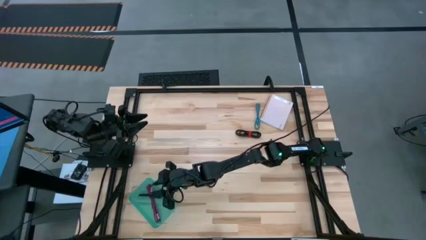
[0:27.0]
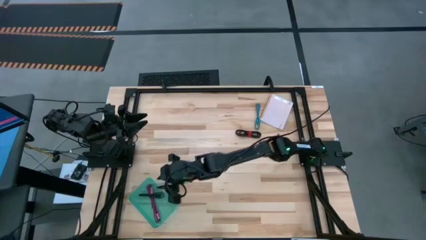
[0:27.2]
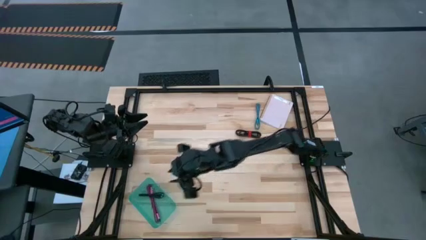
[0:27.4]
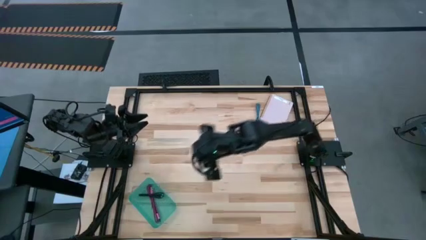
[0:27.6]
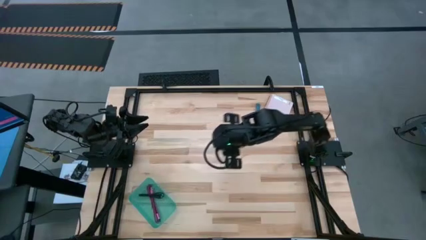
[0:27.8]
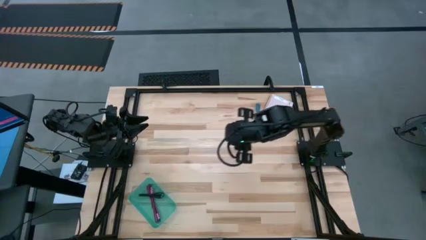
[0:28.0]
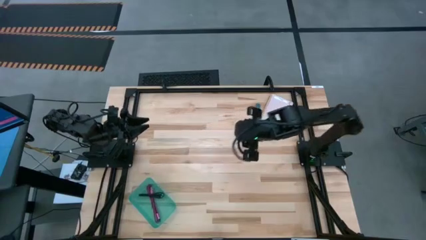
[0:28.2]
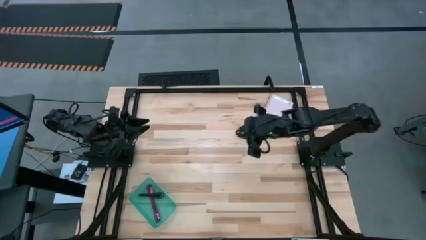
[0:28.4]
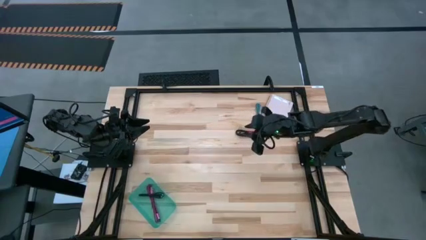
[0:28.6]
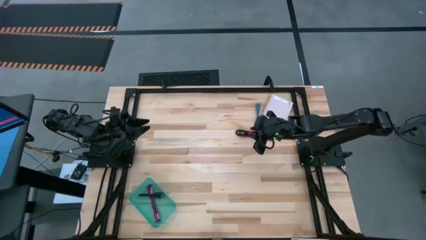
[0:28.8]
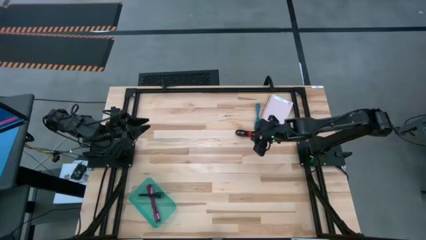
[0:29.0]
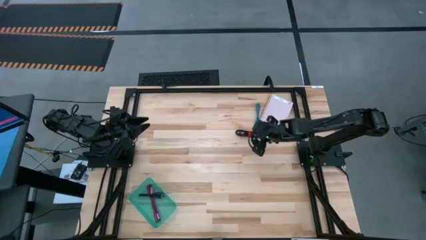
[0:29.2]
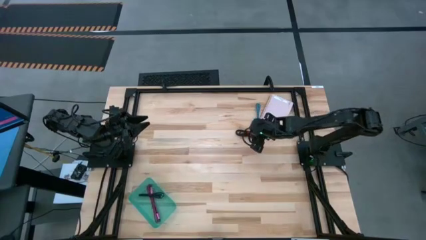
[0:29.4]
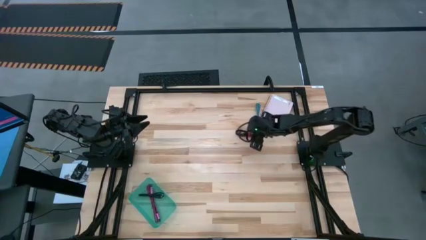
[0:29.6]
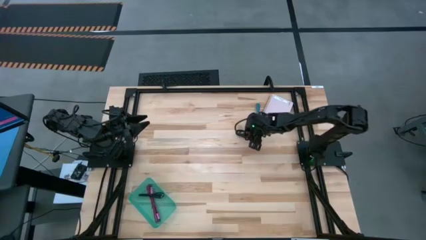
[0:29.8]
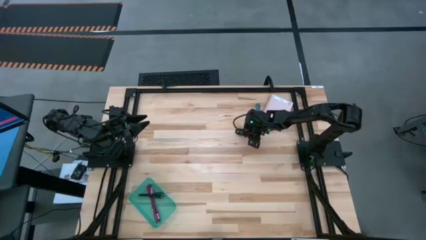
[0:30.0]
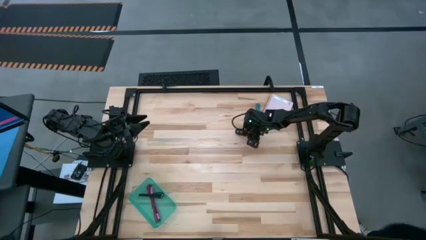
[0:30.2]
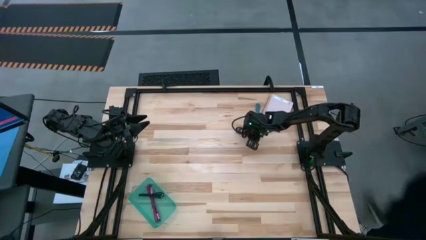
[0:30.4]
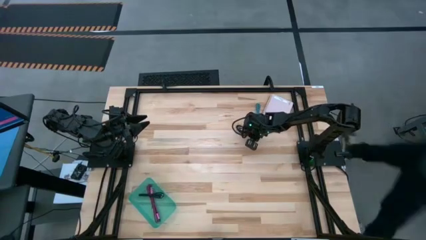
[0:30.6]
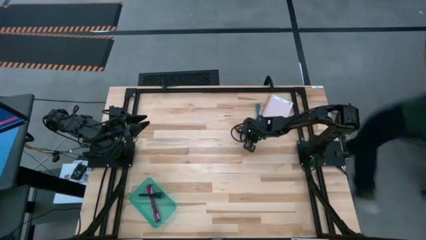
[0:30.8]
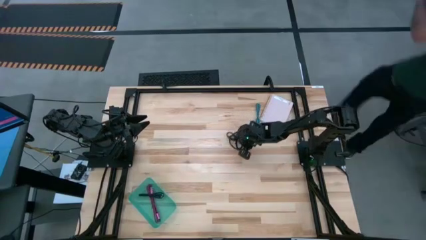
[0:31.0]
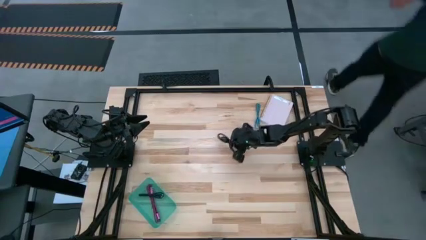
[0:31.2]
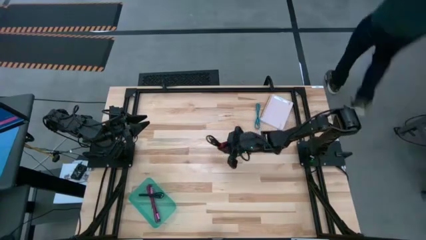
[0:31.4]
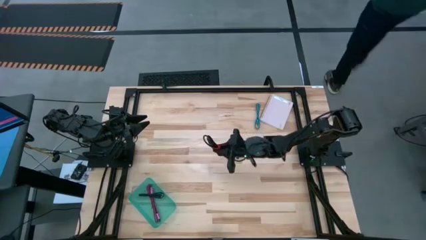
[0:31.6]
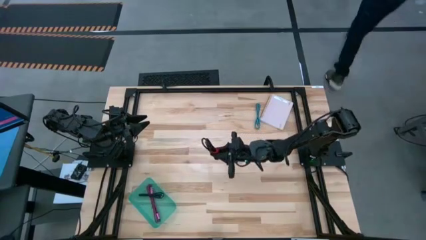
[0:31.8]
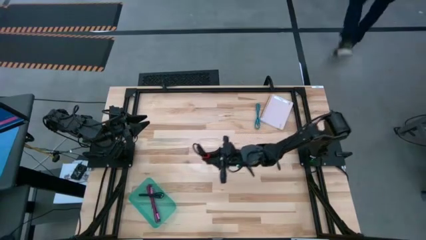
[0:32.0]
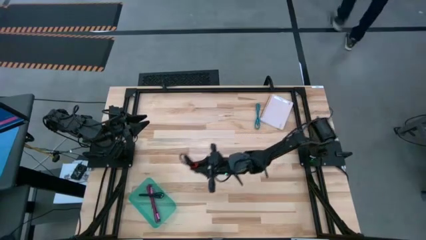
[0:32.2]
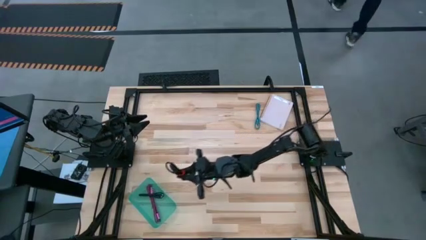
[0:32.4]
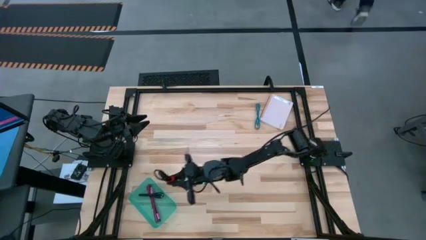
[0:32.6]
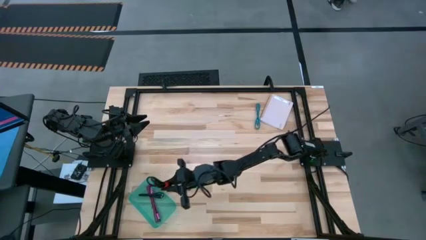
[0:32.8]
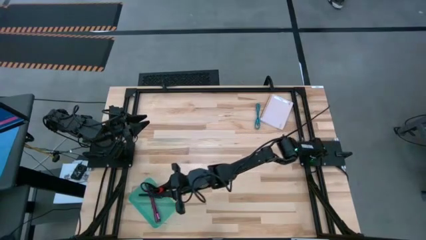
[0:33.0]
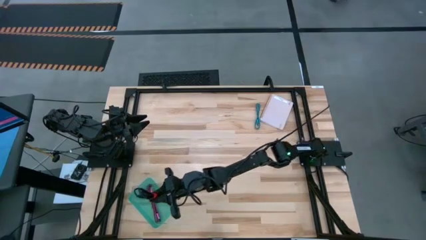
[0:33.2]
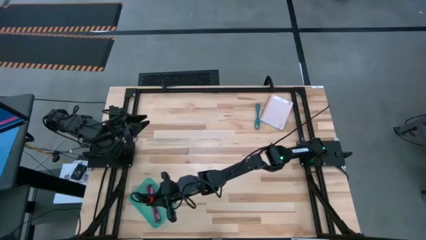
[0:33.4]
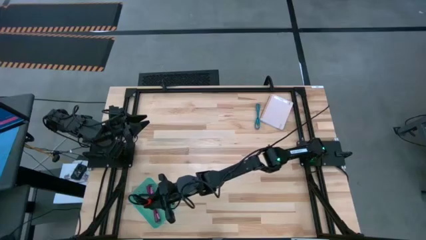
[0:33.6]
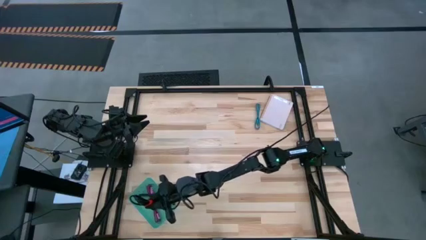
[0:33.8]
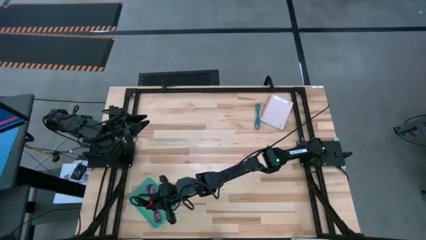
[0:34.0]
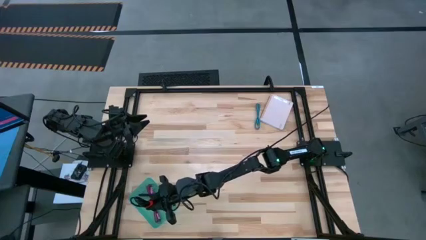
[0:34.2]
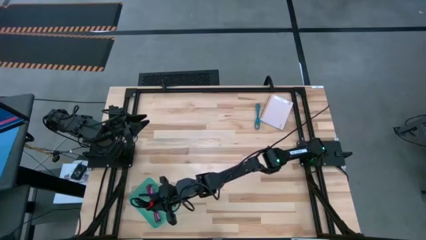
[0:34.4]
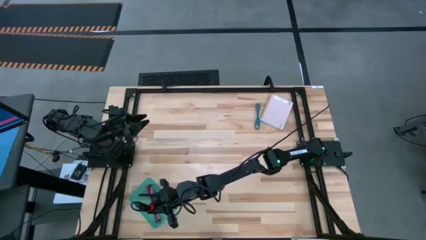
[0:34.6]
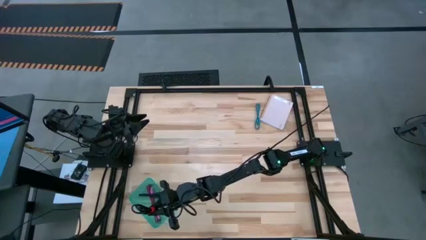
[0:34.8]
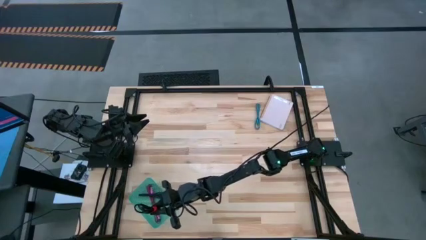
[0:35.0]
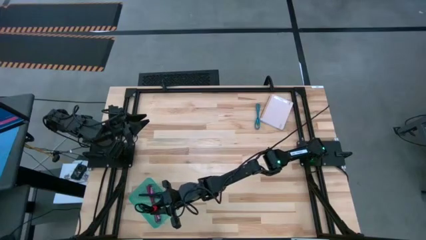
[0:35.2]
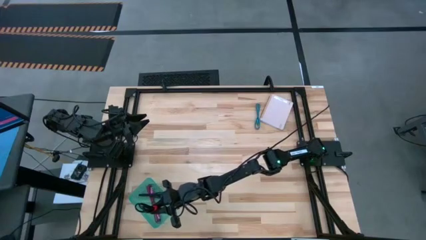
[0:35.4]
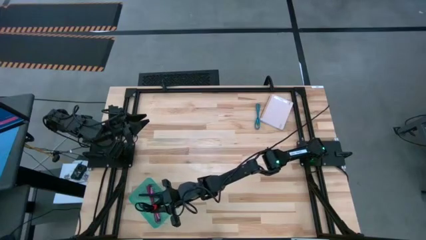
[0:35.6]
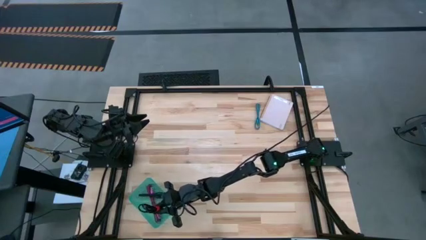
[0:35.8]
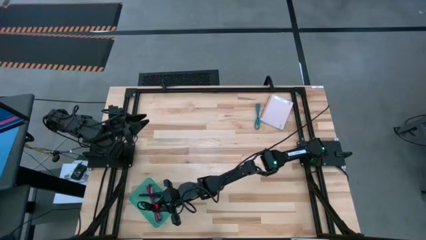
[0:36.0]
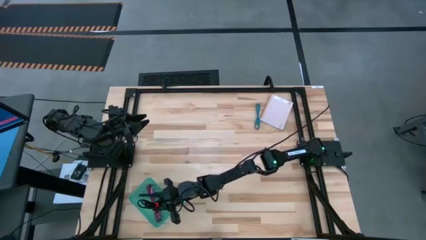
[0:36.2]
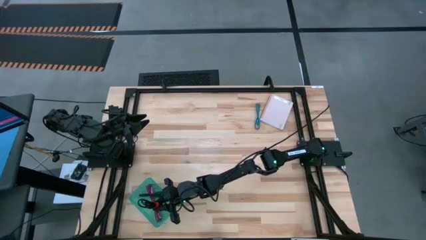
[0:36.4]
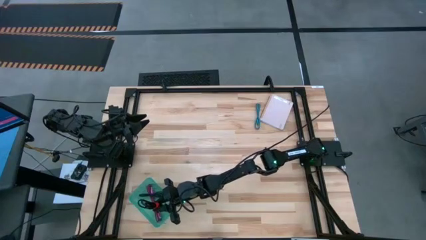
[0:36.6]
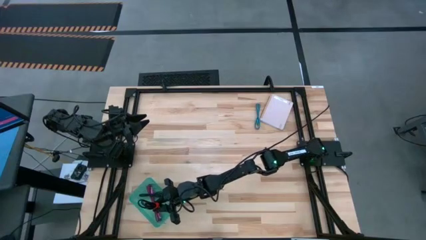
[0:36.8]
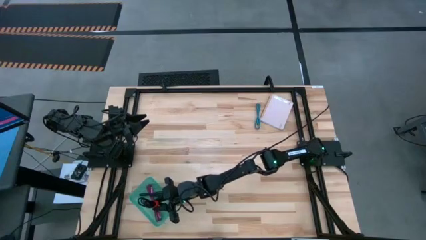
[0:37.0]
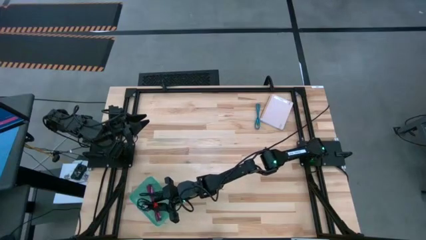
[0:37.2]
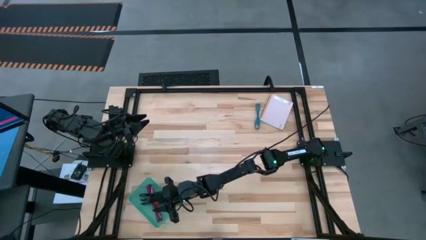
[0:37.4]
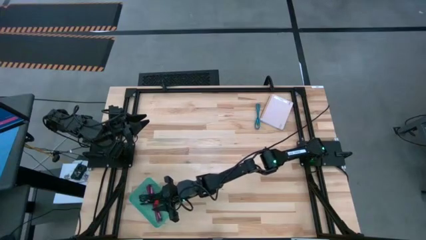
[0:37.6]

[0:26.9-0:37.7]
Task: Pick and place USB-C Cables
Put the black USB cable into the green bin
